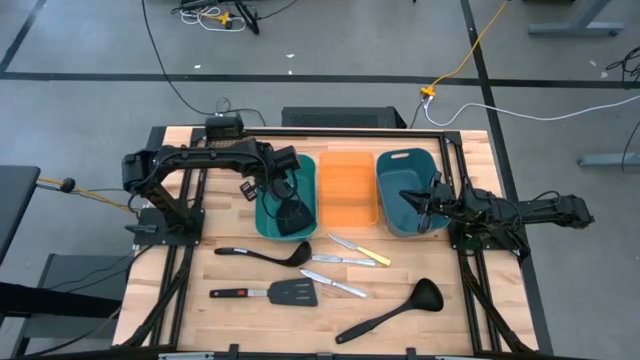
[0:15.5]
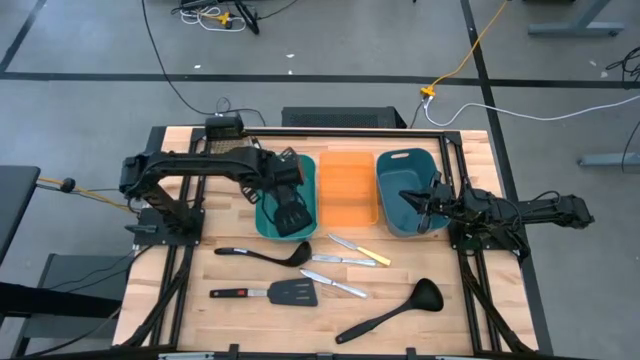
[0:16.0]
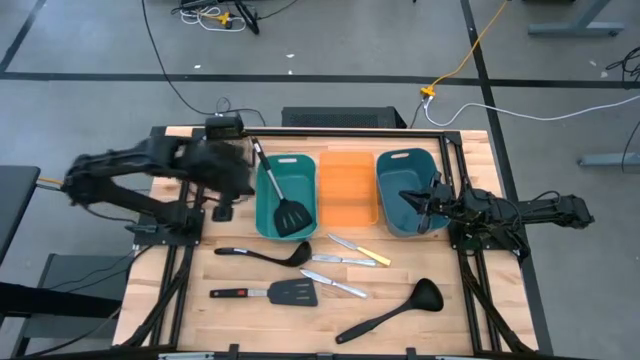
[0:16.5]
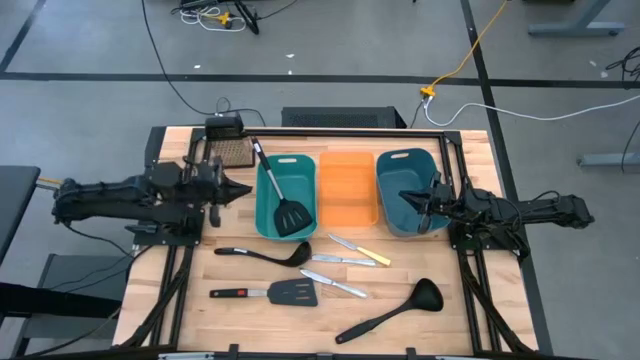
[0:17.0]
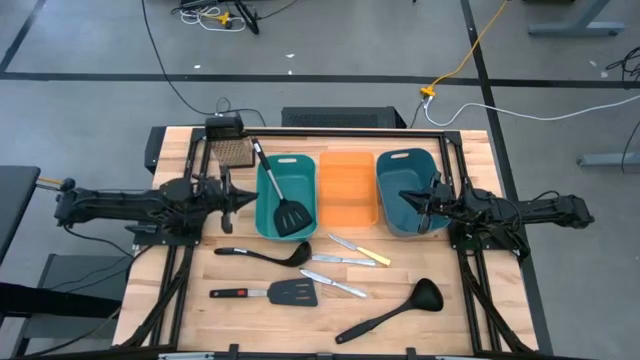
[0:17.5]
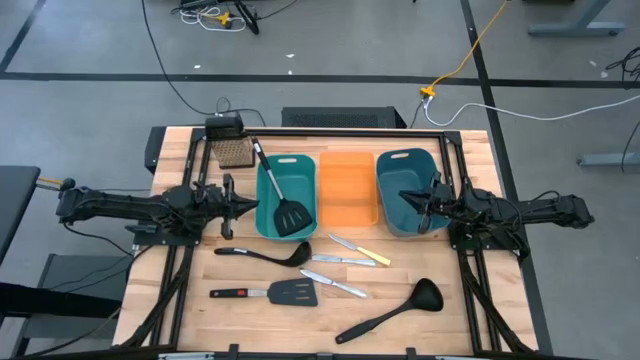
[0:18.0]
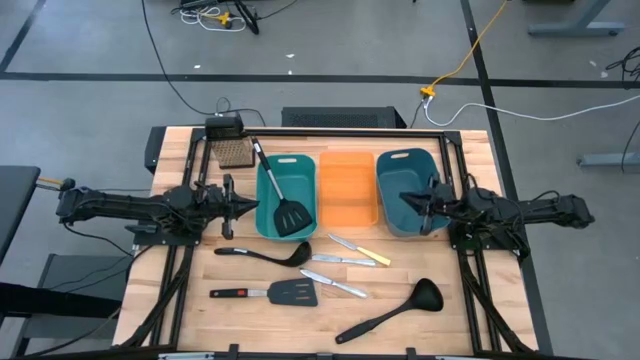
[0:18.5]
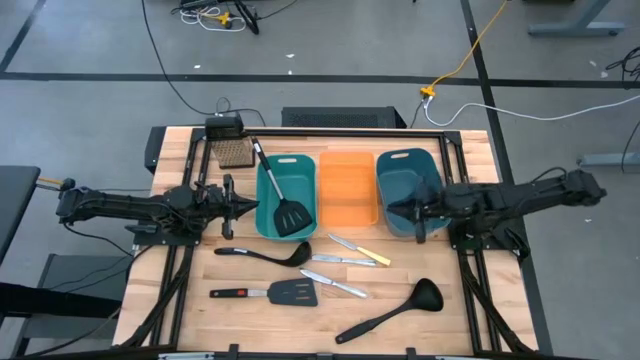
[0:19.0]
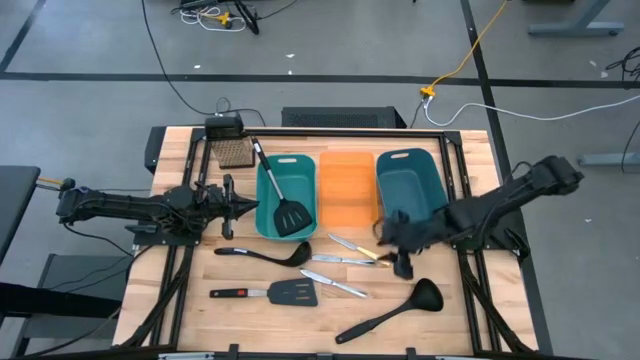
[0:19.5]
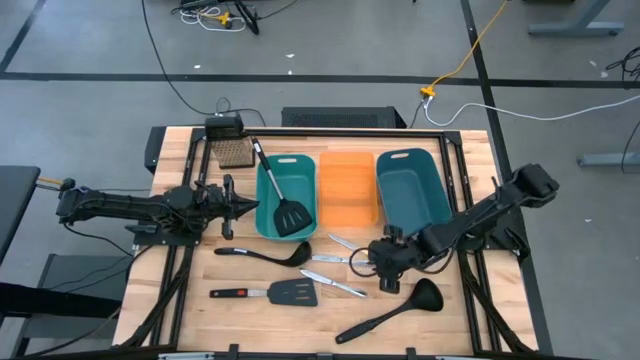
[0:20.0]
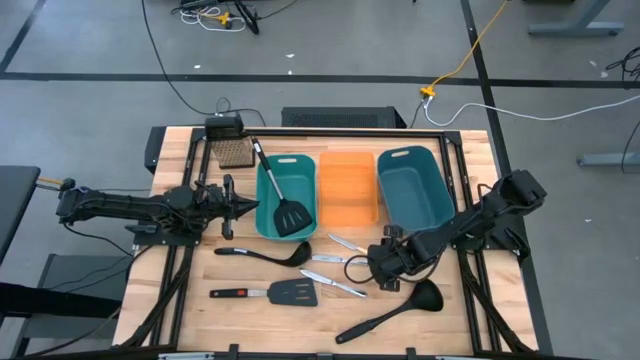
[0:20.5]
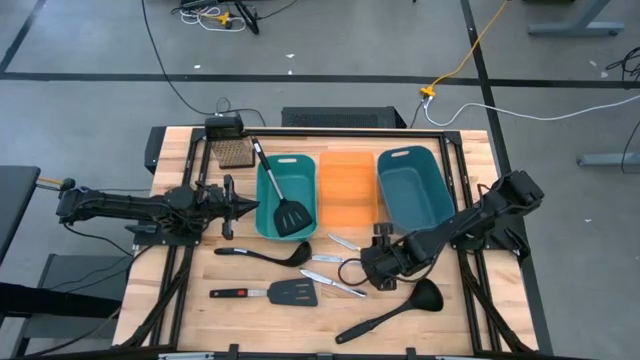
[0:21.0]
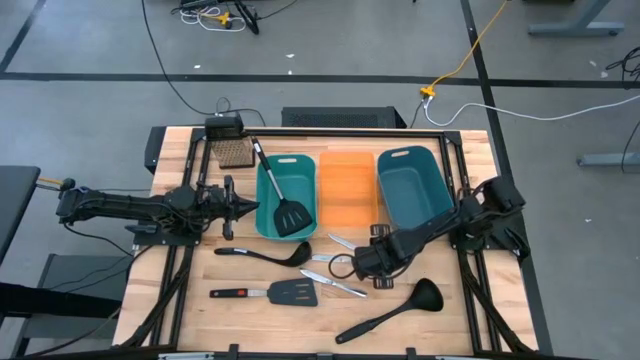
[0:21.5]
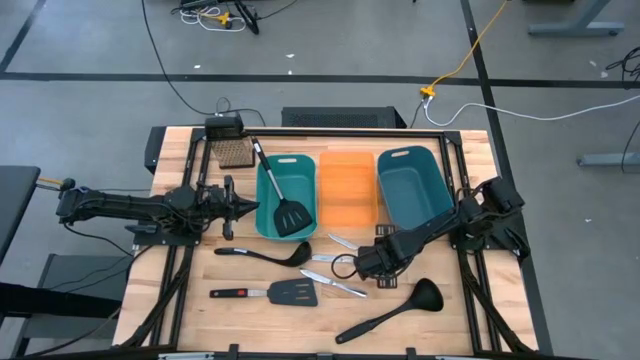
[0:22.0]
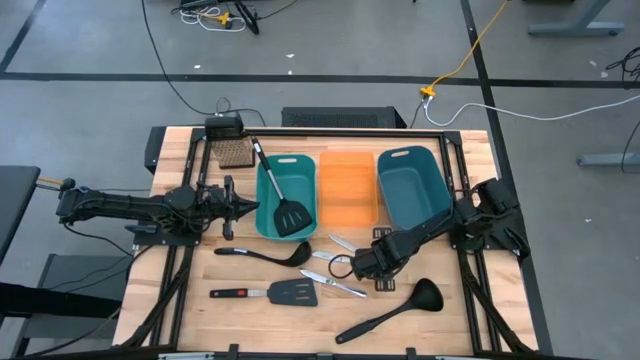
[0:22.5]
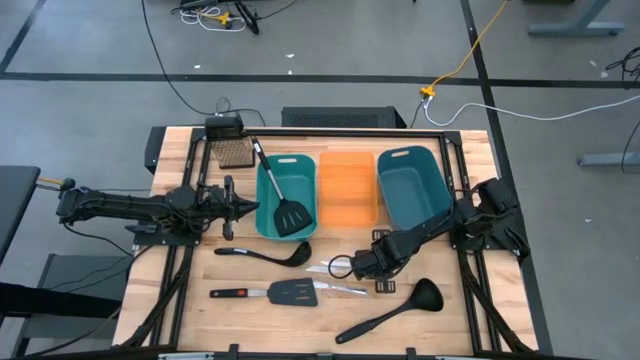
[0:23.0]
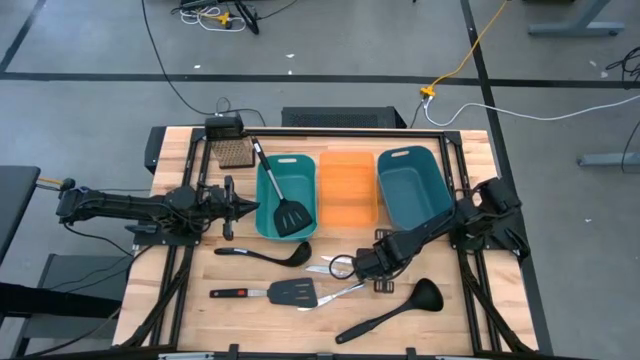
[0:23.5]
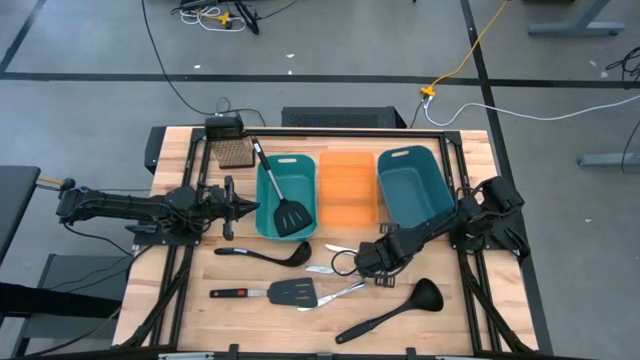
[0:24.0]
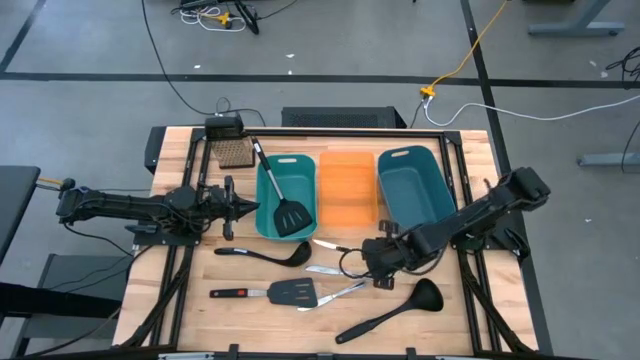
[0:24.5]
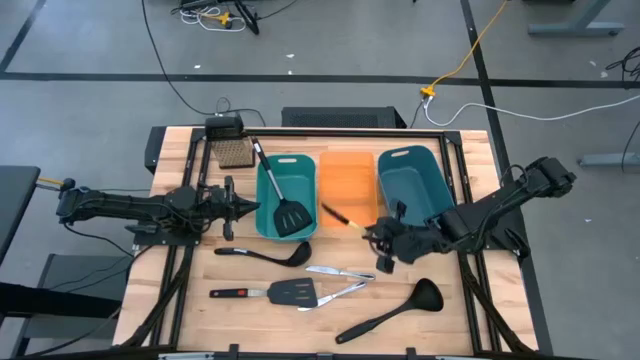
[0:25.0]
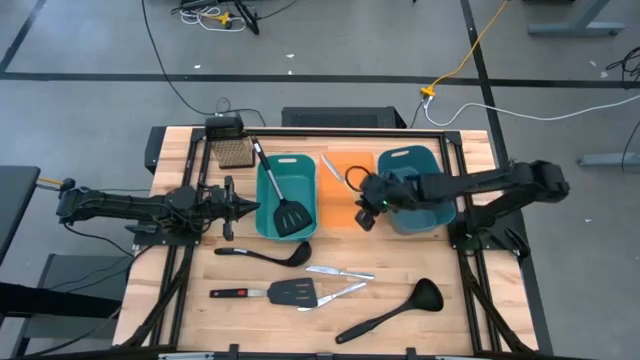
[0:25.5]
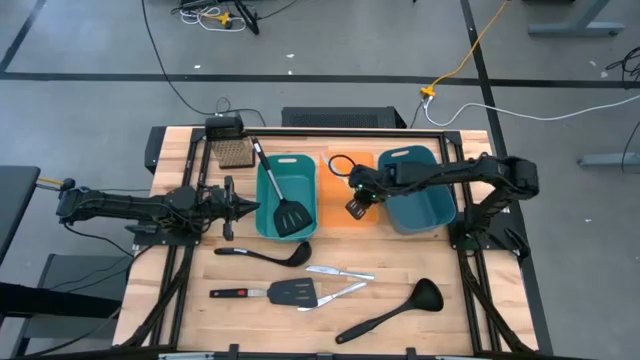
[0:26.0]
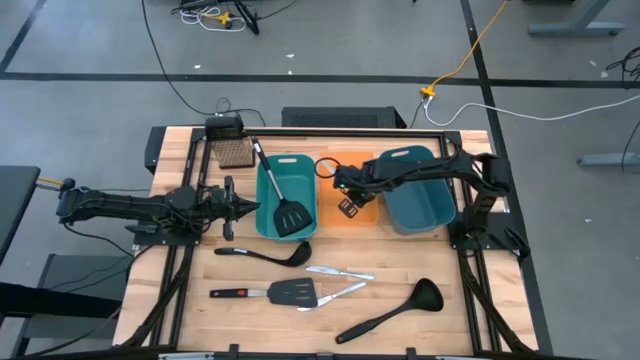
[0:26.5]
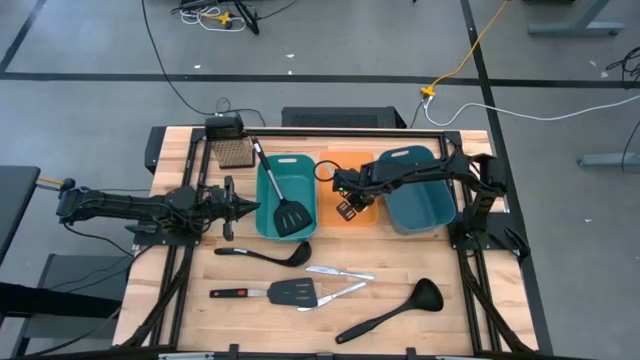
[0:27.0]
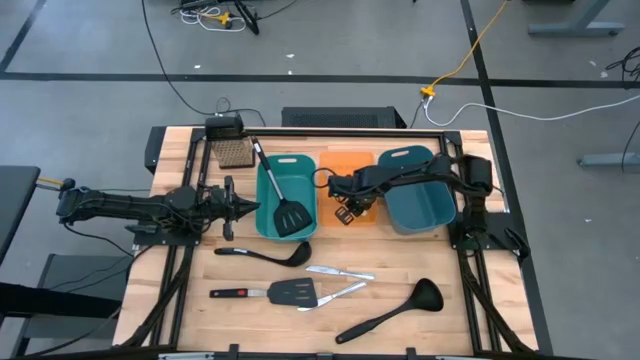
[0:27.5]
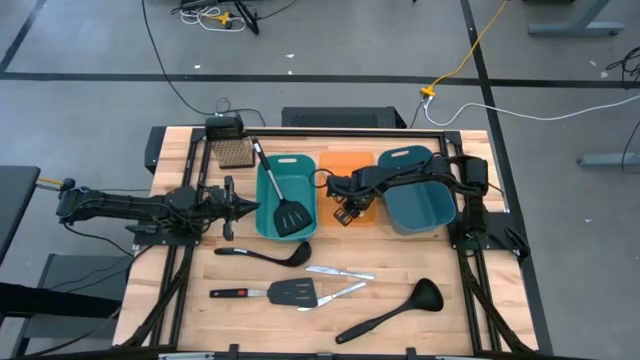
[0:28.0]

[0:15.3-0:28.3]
Task: Pick & Place Kitchen Items
Put the orange knife into the orange bin

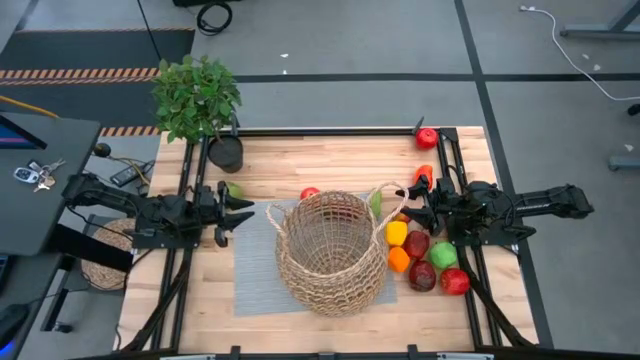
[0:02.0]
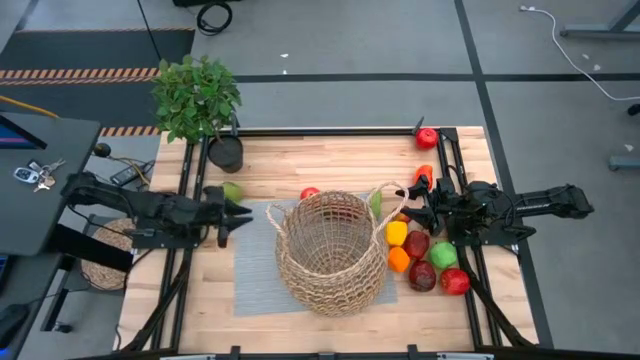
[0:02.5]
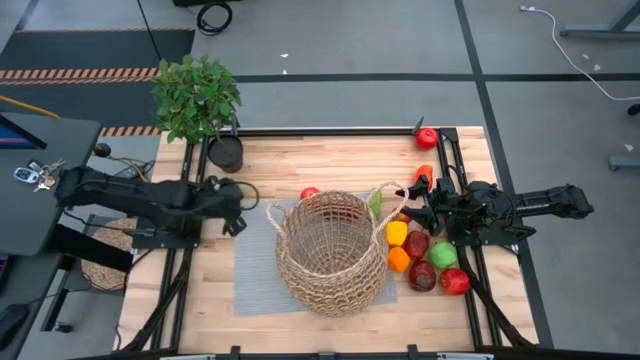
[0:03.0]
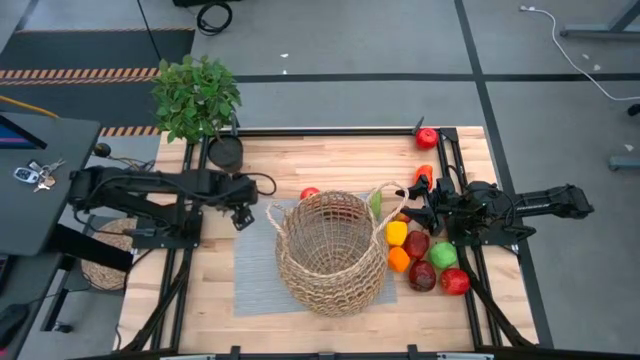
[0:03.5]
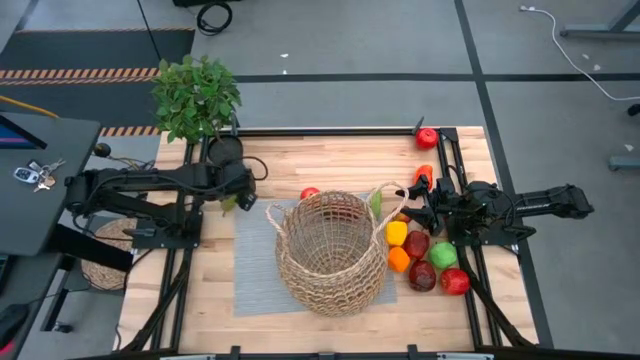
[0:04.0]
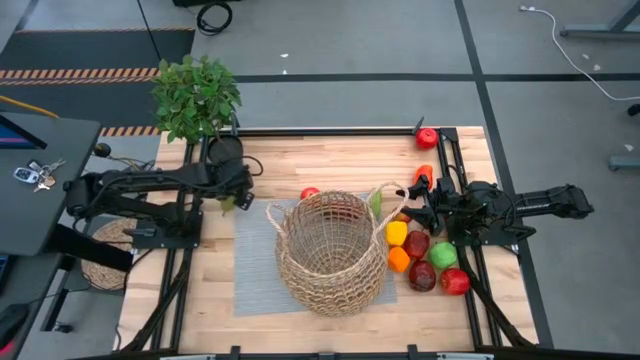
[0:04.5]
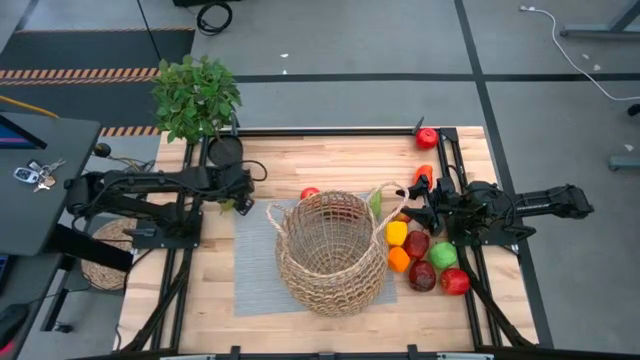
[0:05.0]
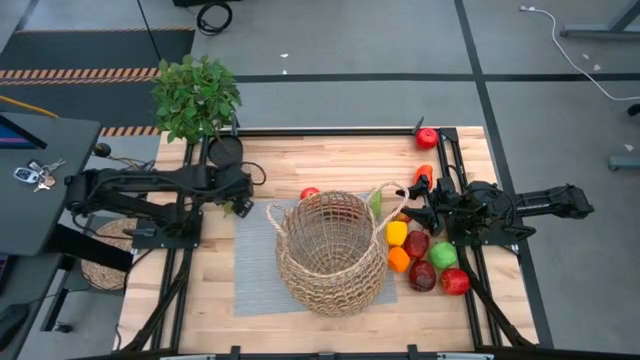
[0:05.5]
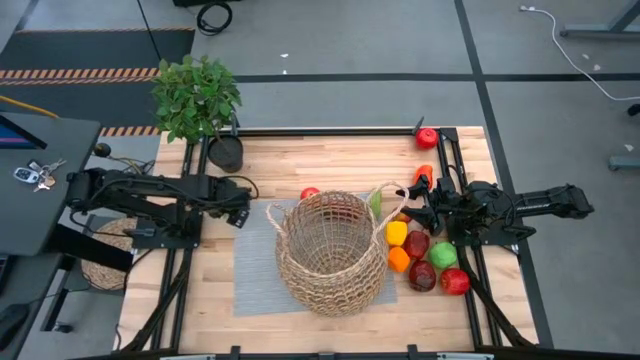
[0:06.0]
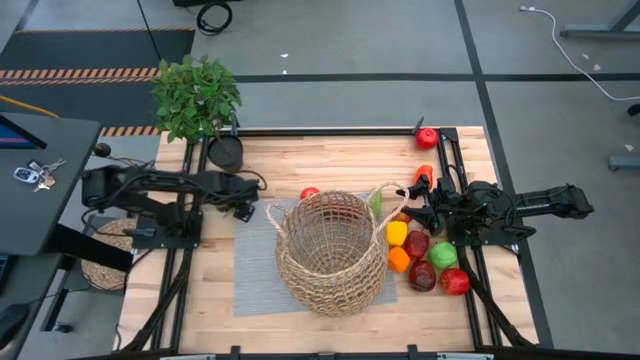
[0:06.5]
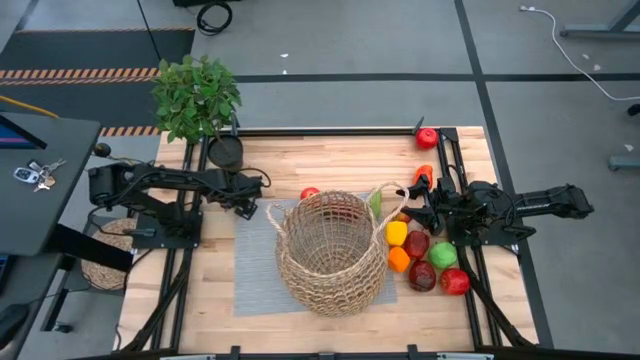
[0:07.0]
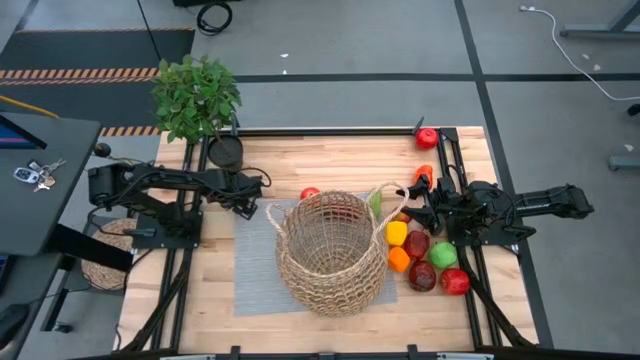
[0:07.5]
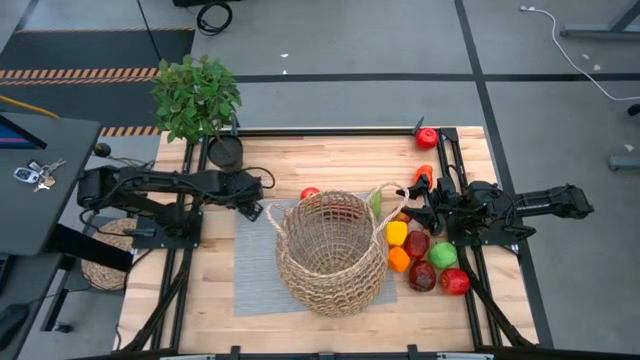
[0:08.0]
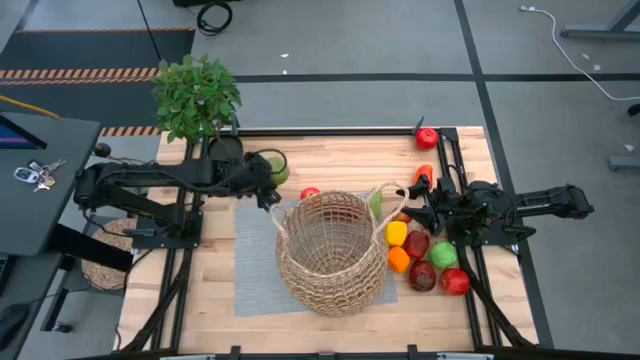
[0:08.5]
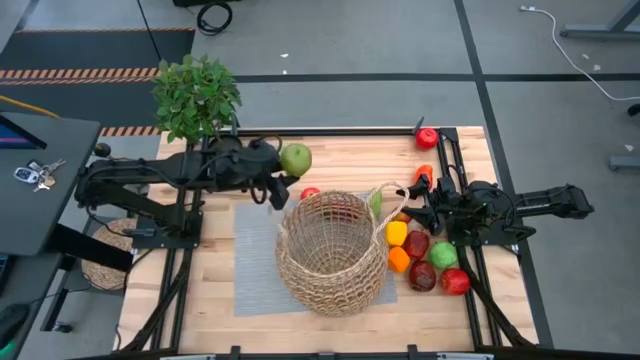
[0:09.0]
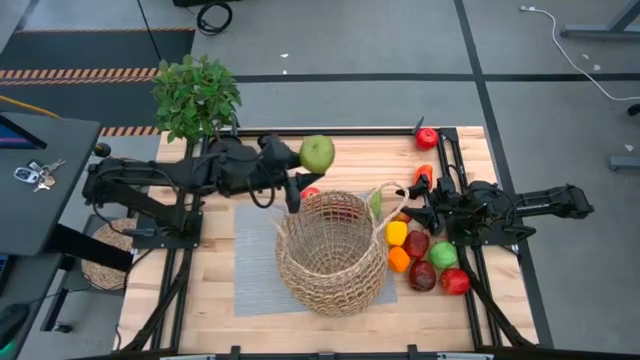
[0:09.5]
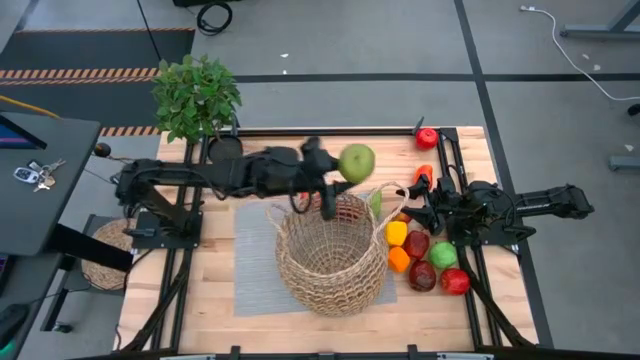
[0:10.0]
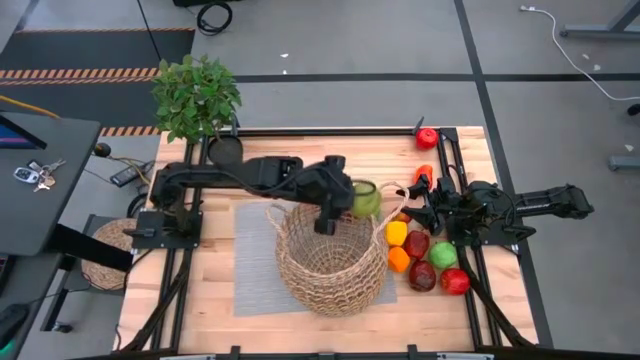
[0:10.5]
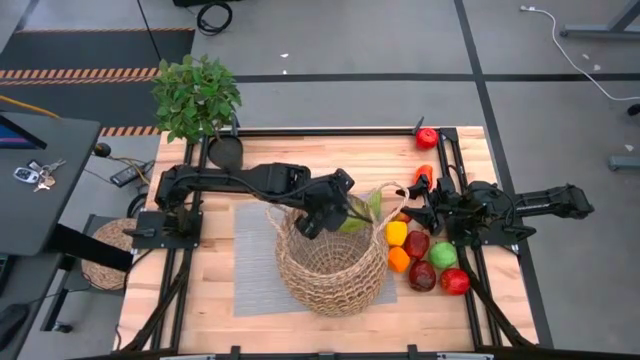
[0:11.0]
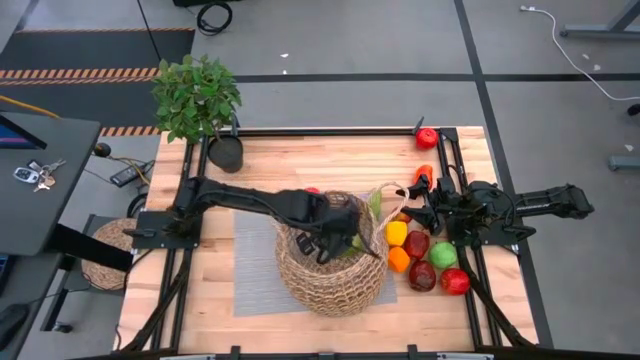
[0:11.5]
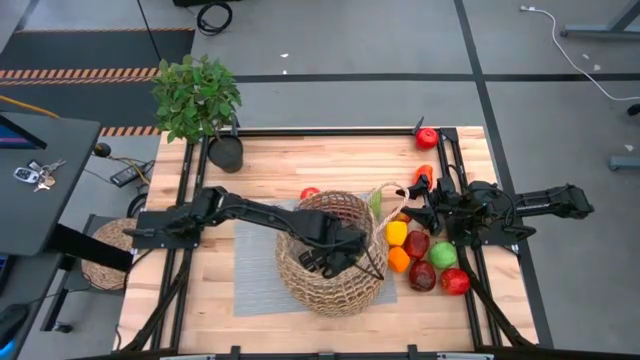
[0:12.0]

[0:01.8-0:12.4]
Task: Build produce basket
Put the green pear into the basket
